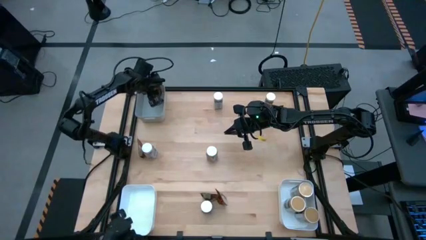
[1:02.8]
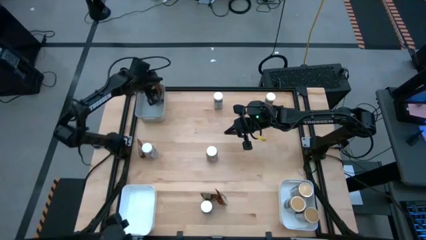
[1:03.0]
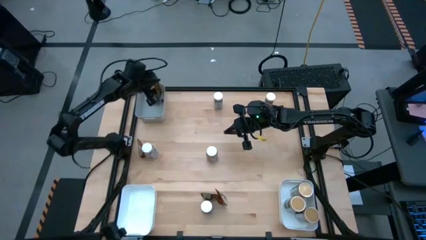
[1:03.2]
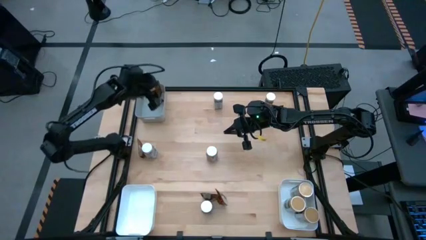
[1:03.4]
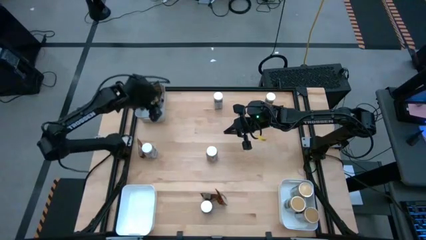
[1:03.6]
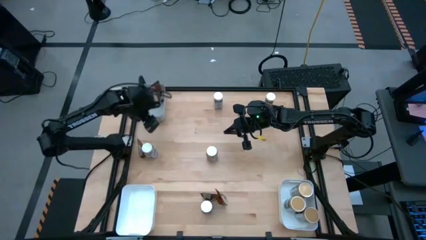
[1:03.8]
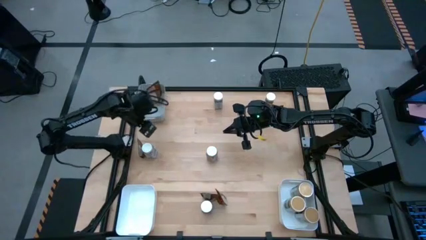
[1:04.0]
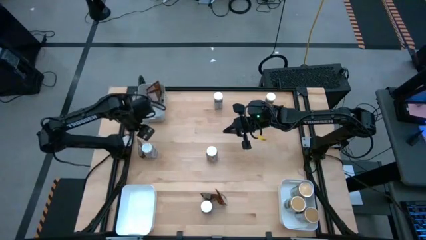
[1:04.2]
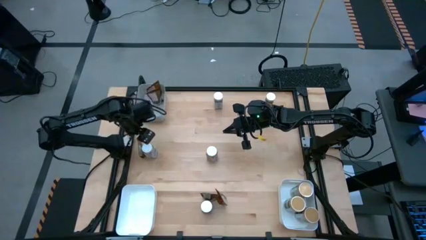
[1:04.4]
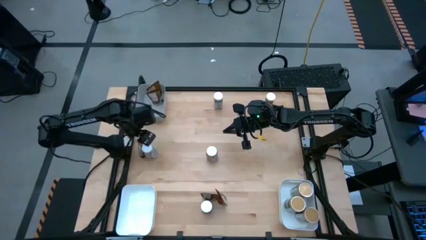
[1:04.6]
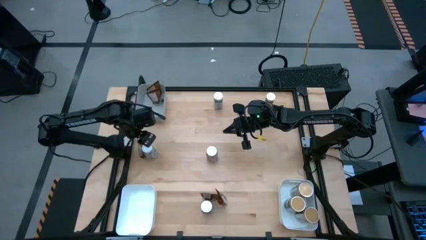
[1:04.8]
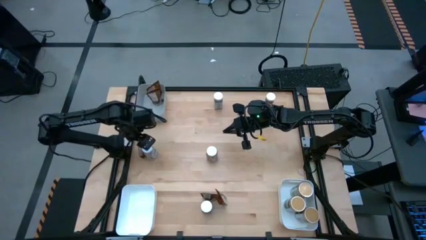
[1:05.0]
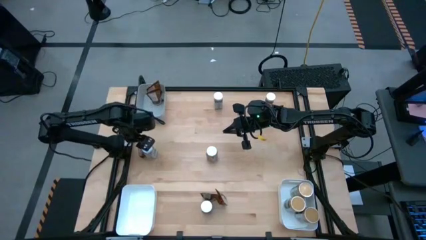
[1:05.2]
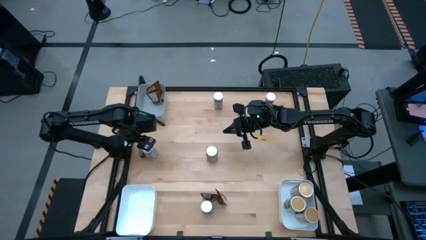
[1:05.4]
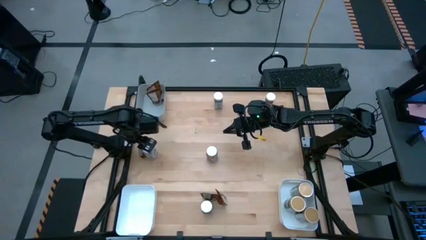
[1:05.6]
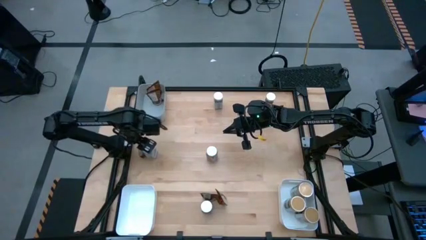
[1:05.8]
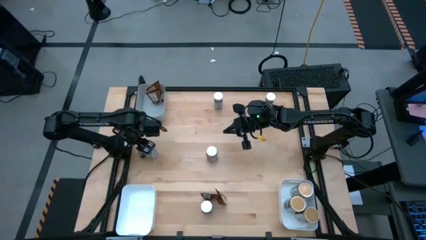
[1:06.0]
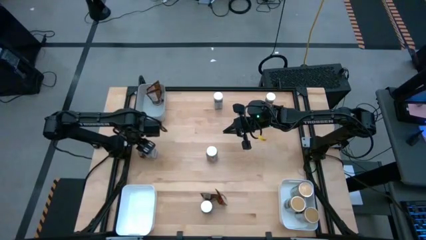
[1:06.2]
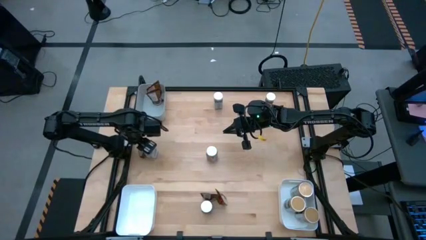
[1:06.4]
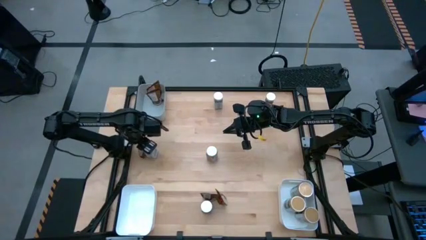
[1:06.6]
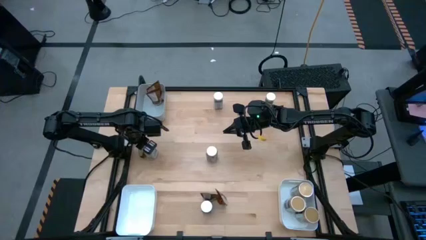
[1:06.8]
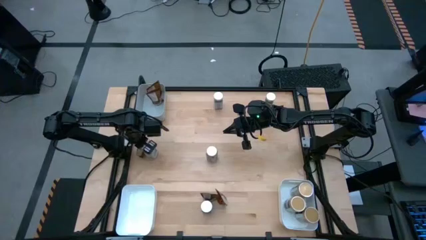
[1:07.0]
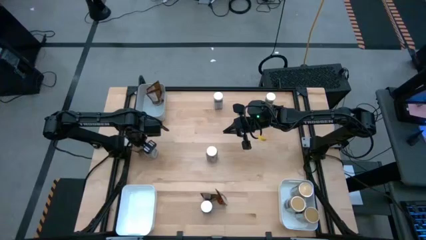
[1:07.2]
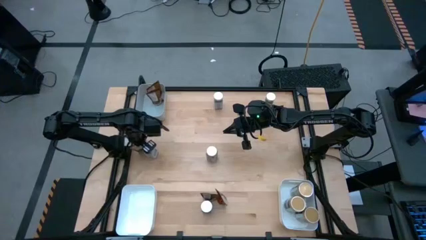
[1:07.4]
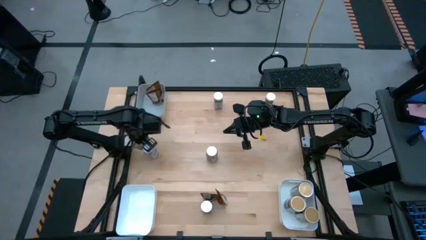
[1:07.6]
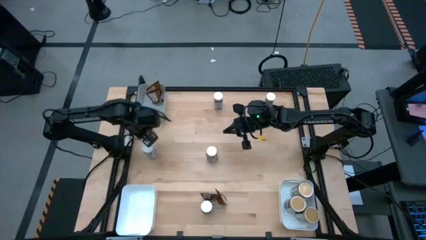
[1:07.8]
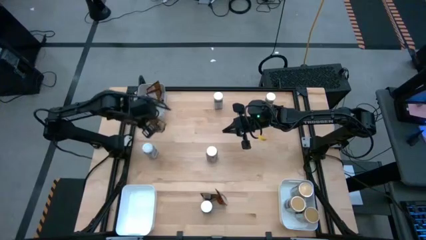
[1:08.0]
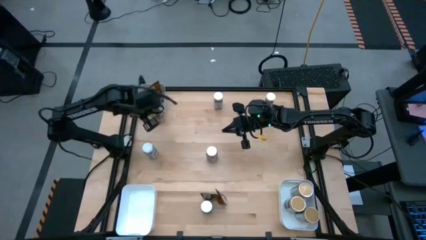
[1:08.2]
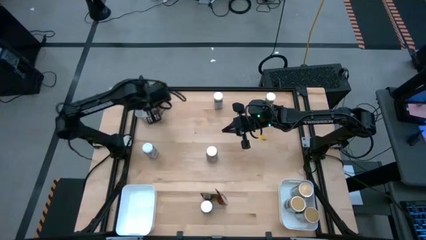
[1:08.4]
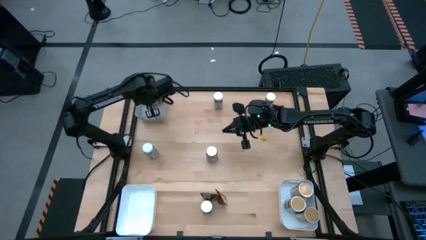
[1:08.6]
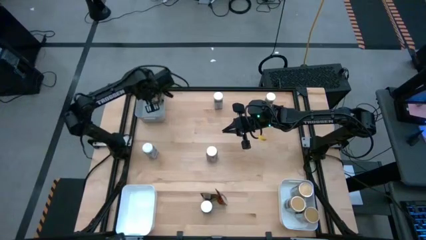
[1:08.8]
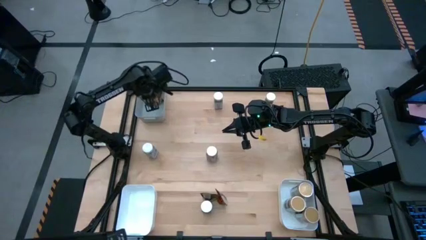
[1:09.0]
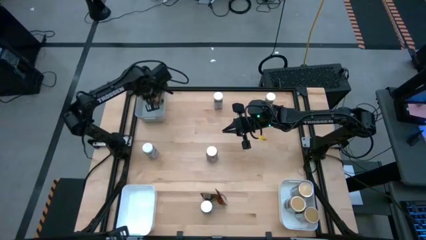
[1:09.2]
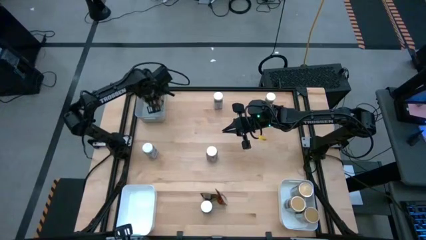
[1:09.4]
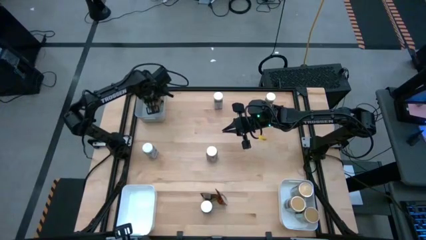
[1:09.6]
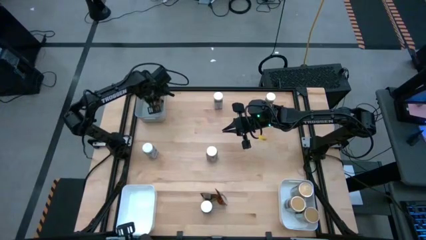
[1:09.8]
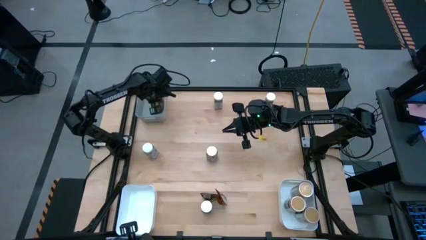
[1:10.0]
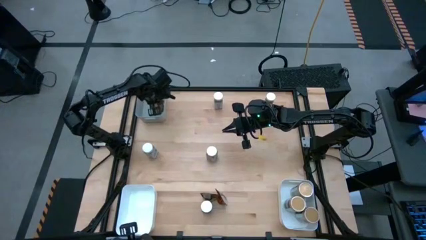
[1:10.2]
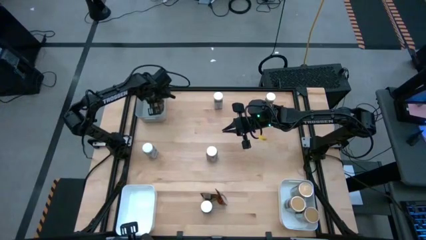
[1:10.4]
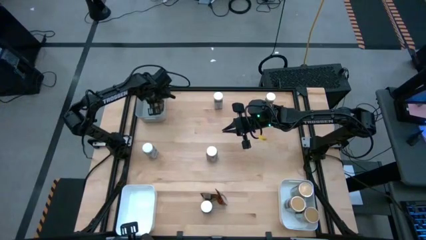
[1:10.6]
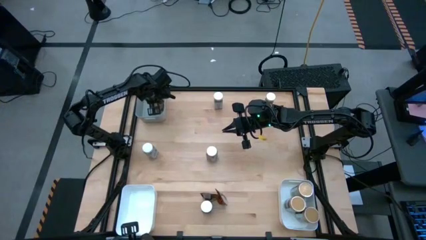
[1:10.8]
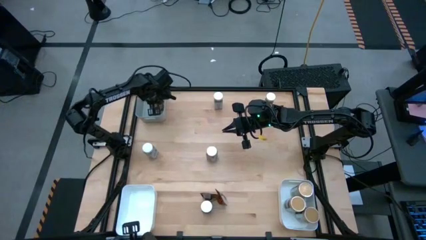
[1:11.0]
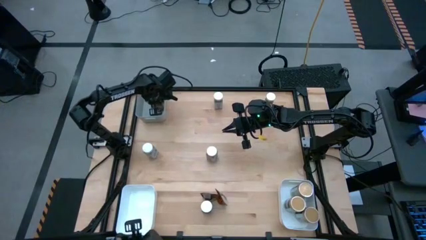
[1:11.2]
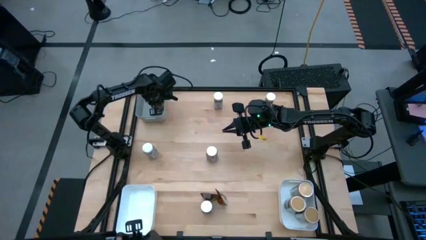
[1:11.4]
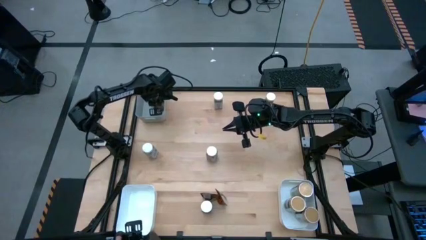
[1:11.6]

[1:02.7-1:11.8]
Task: Sort spices by type
Put the brown seasoning bag into the top left white bin

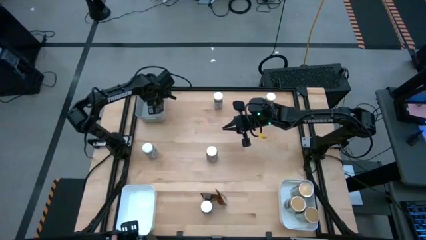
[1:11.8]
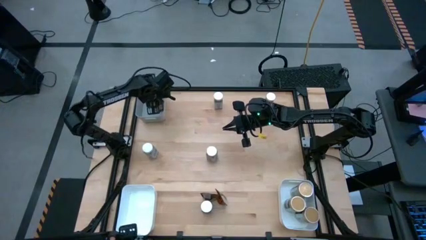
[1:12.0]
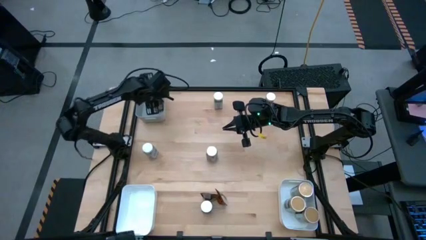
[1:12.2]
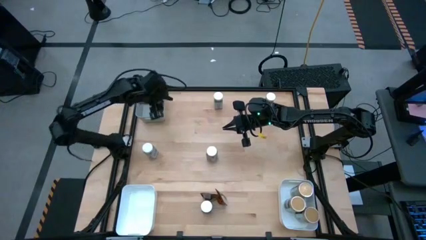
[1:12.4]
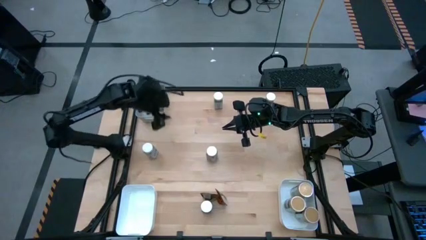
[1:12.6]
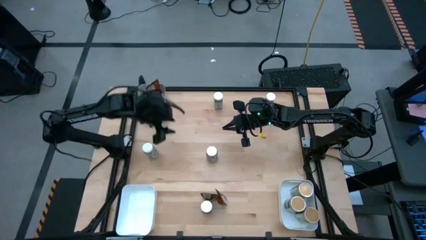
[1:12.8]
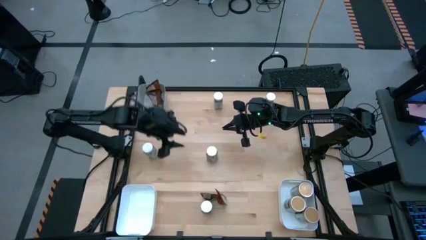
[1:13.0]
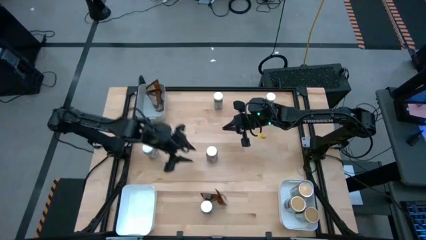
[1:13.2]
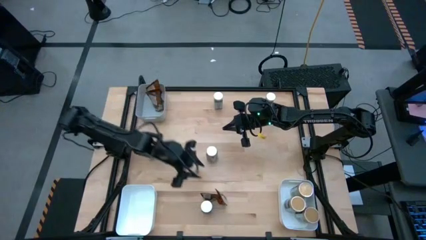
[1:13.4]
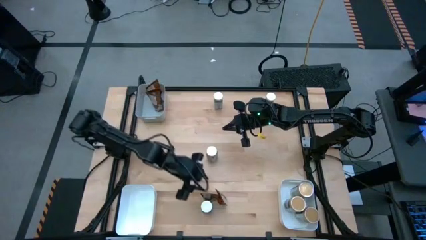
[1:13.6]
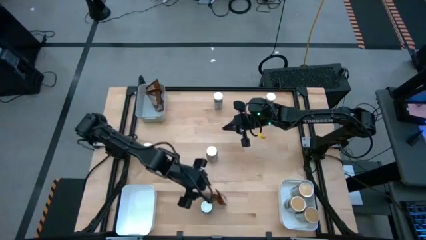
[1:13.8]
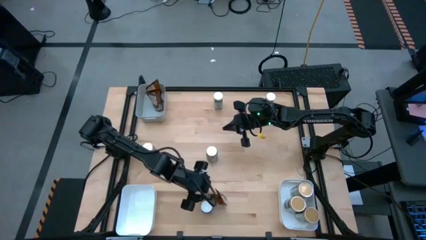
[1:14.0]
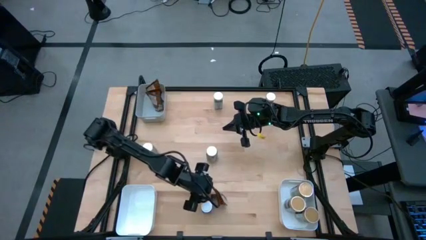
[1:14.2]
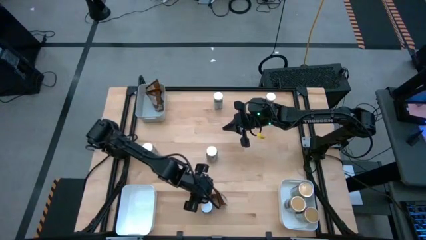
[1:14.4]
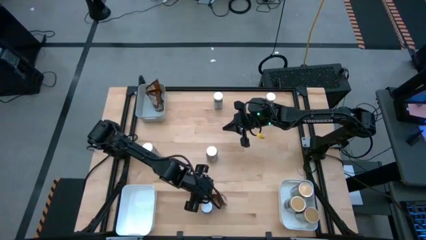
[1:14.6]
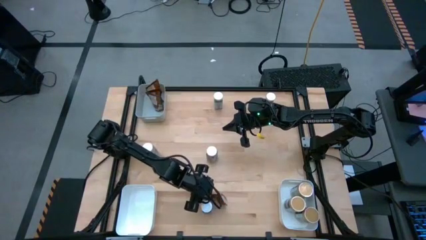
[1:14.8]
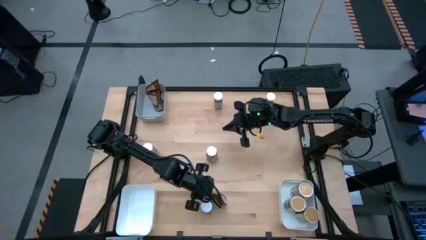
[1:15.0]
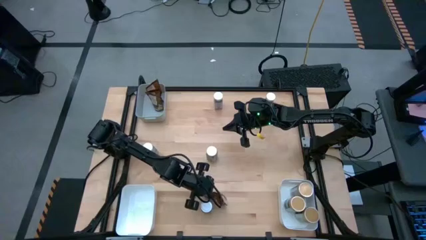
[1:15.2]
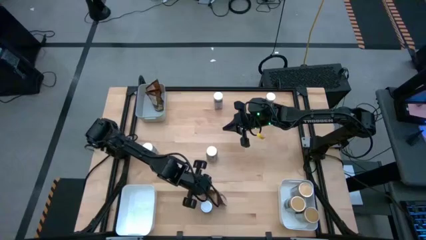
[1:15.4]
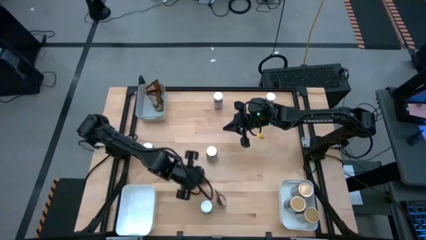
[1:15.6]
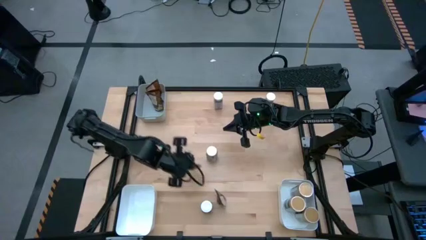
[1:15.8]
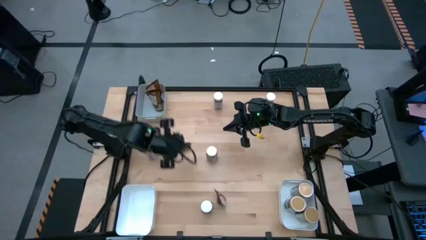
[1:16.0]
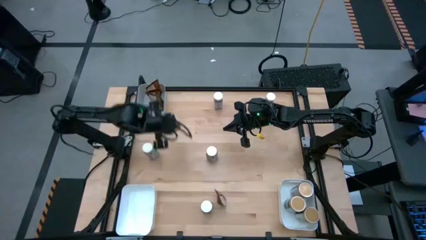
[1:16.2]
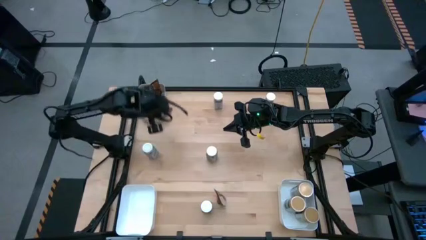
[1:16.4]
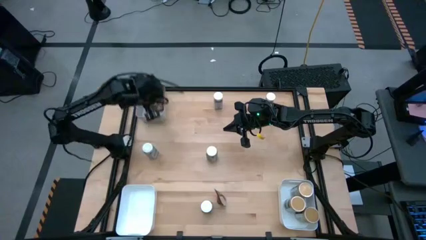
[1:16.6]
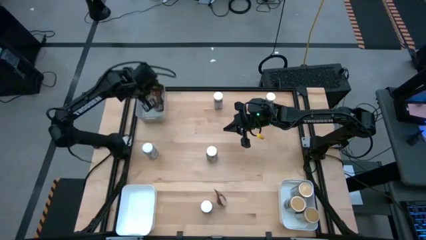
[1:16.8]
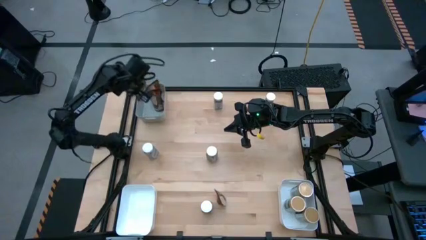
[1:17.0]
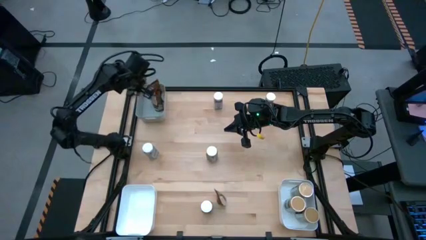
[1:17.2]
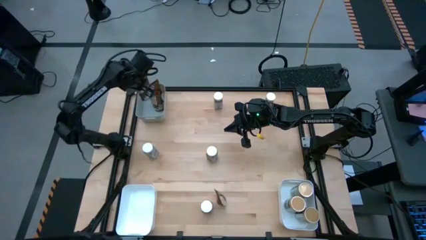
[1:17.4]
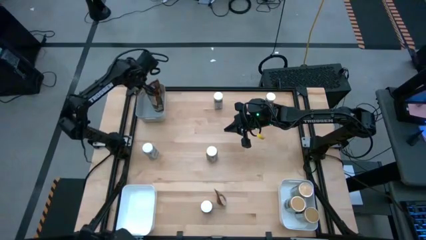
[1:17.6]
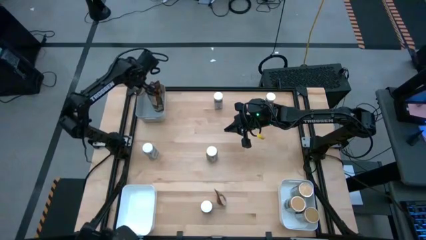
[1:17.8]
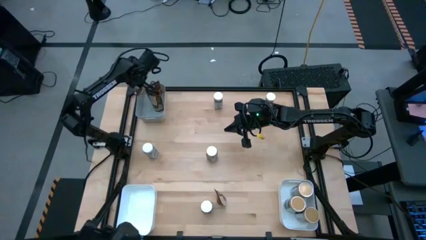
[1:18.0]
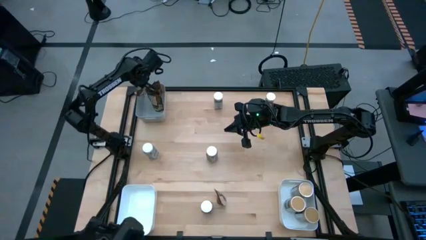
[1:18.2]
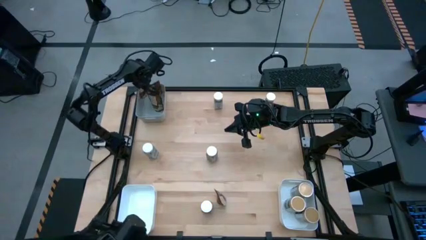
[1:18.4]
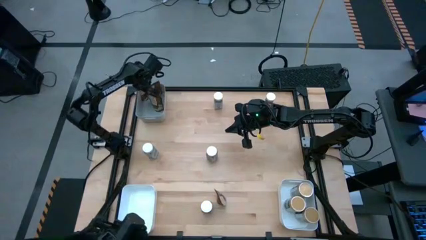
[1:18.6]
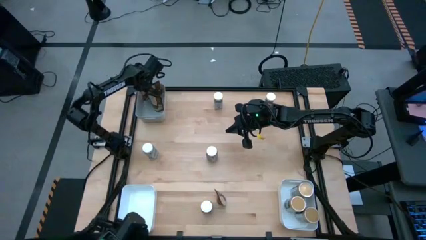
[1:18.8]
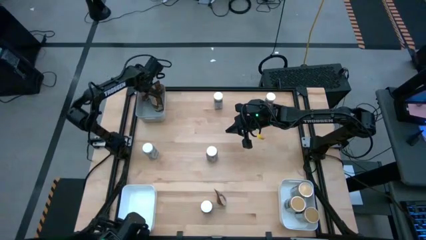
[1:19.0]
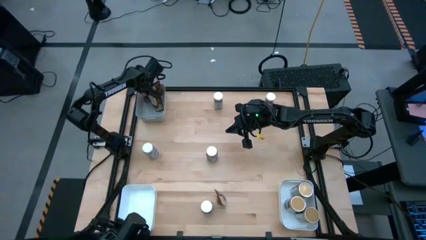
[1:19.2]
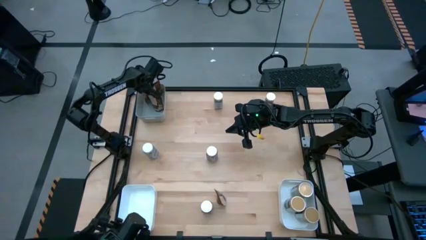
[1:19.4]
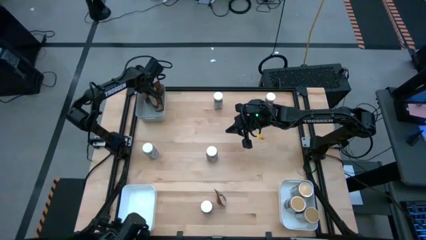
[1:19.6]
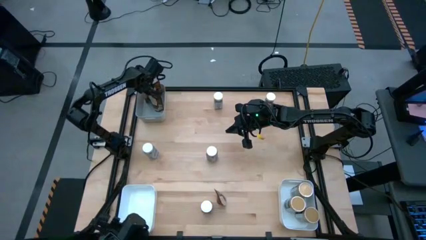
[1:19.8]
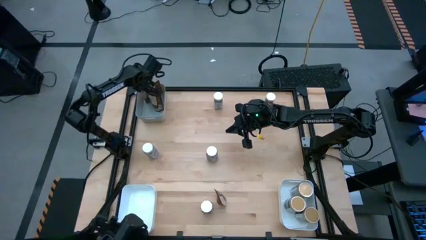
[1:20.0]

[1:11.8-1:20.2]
Put the brown seasoning bag into the top left white bin
